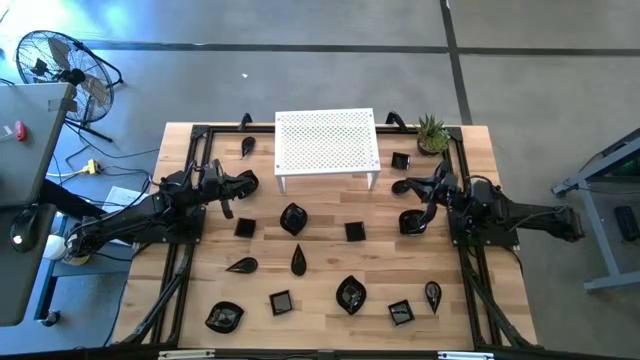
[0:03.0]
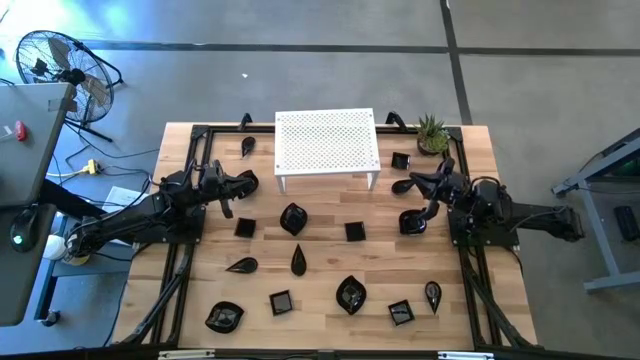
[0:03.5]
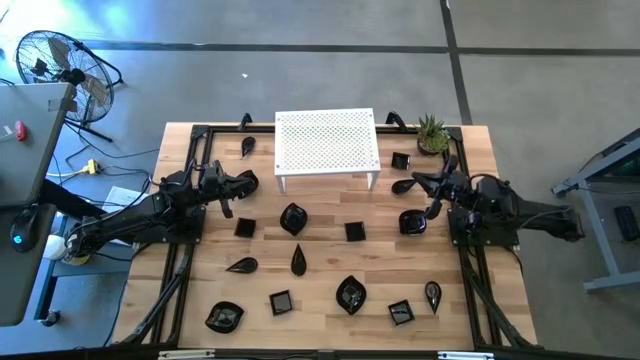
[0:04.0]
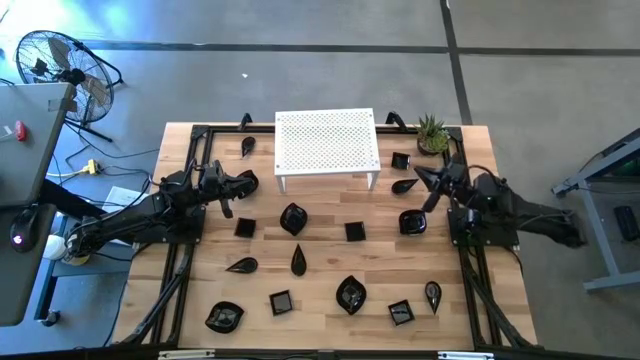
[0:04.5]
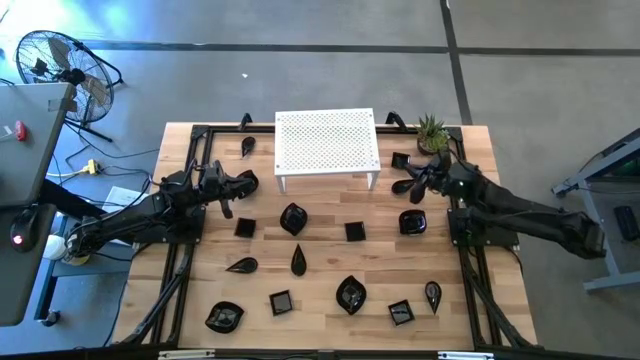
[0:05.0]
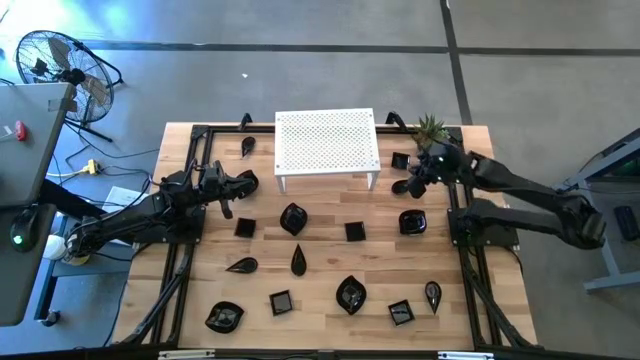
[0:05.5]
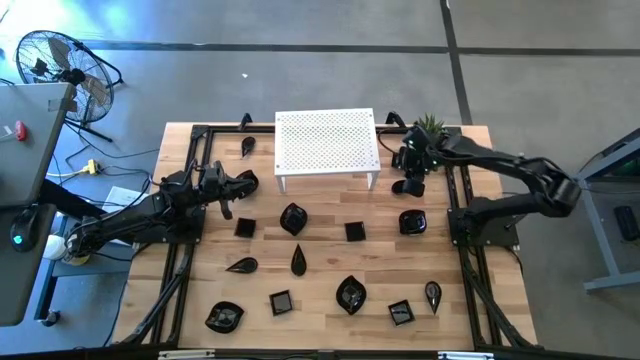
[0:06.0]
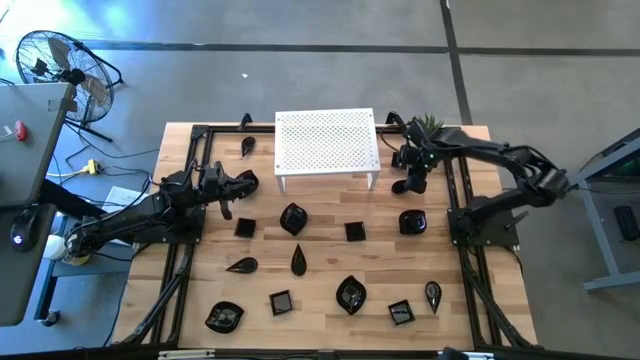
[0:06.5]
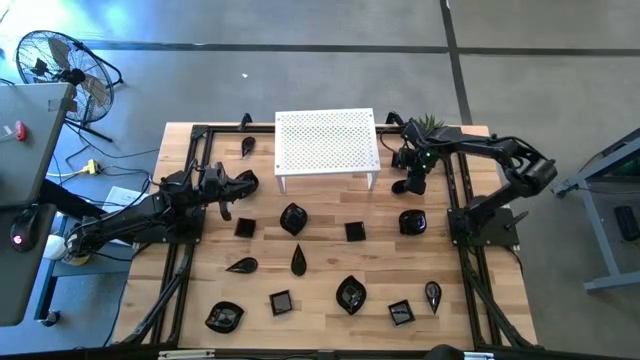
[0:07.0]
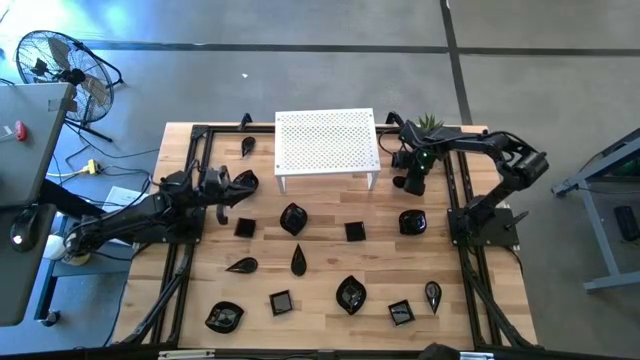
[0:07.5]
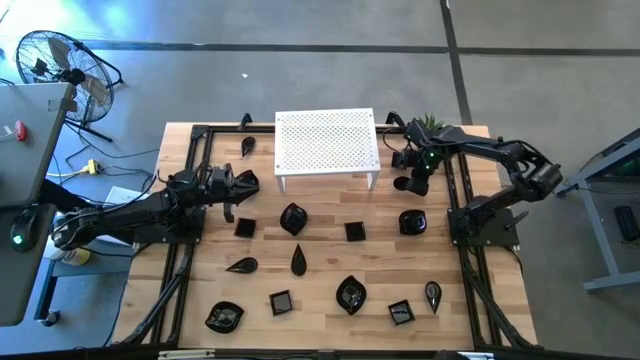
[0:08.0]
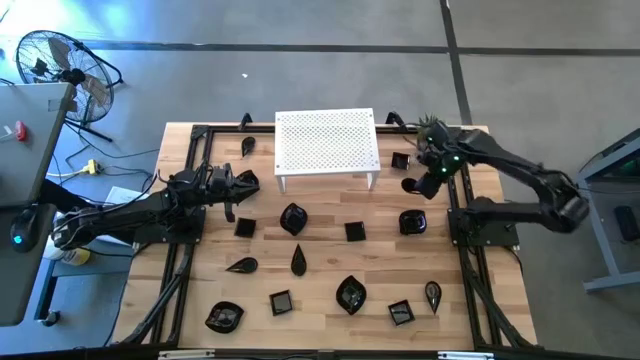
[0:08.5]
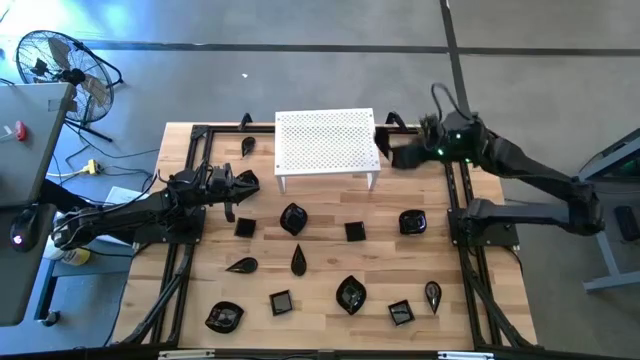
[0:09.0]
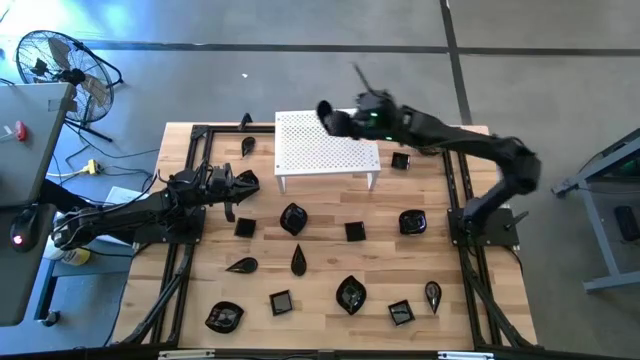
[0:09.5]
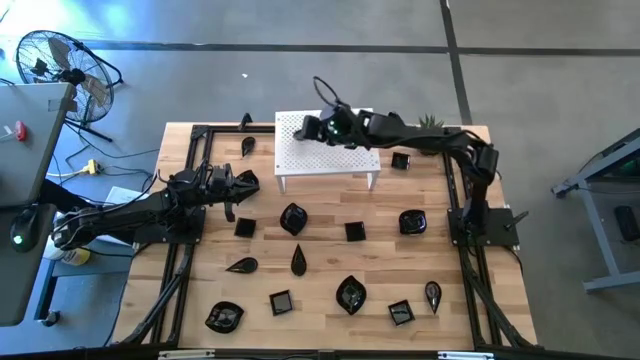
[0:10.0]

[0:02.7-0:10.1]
Task: Pick & Place Mini shaped plates
Put the drop shaped bowl on the shelf

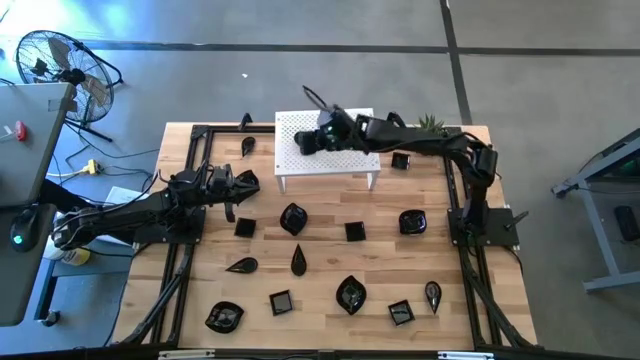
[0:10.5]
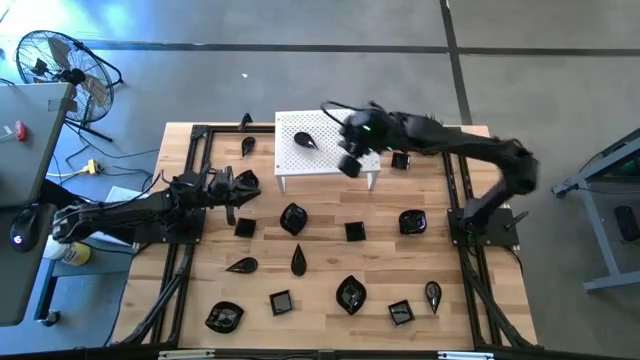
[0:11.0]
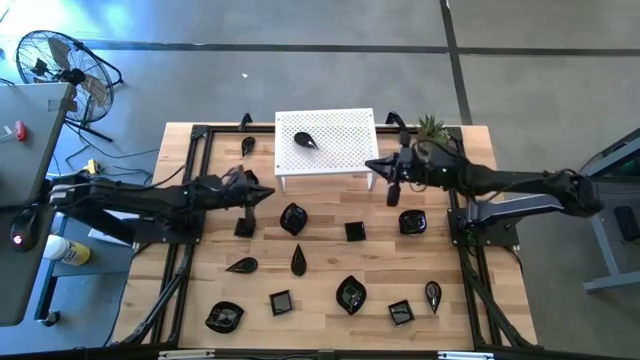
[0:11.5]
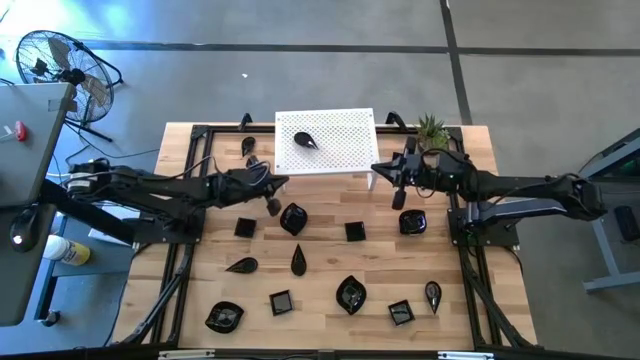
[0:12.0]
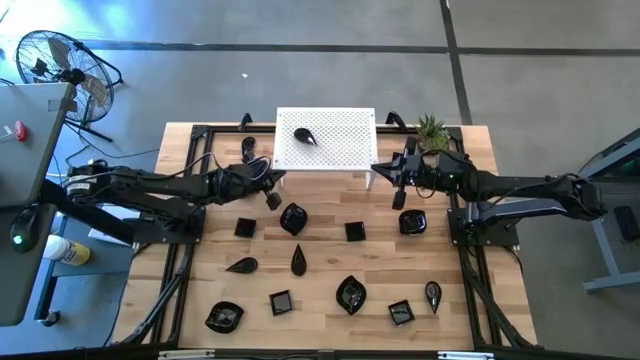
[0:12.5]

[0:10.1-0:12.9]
Adjust the shelf

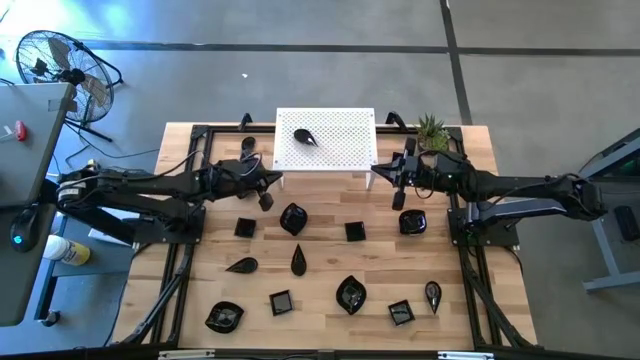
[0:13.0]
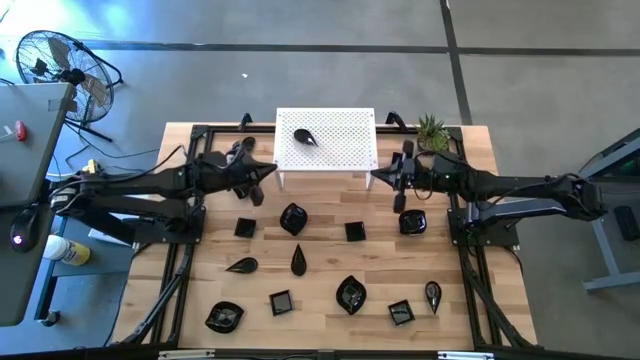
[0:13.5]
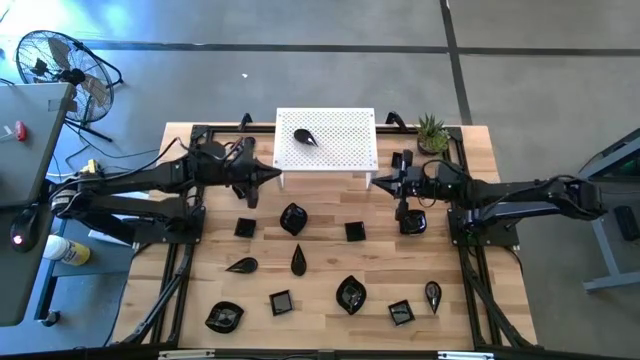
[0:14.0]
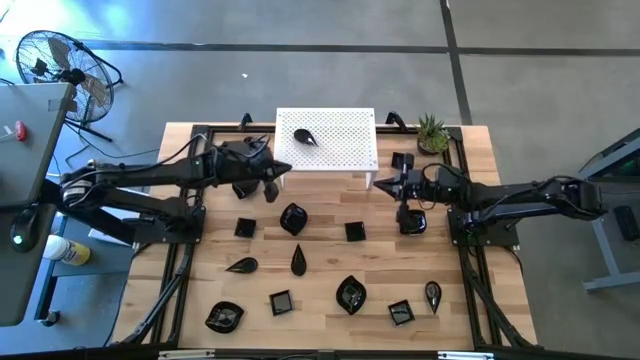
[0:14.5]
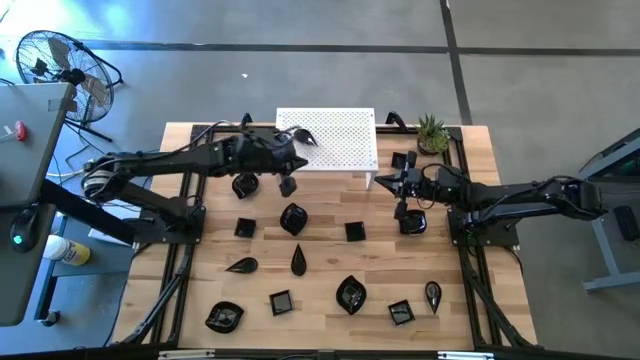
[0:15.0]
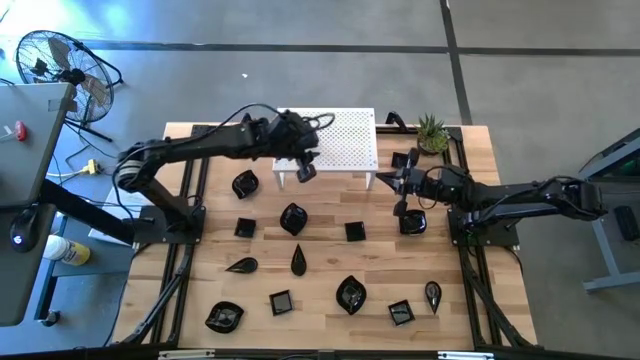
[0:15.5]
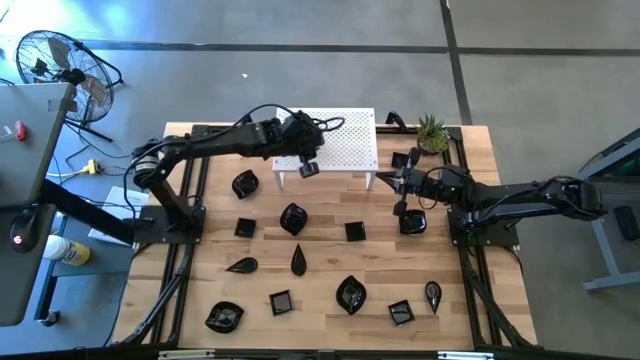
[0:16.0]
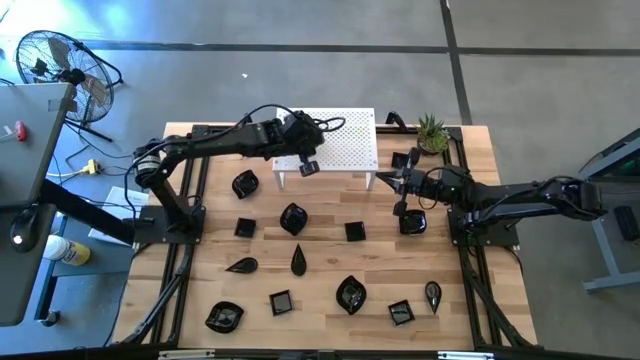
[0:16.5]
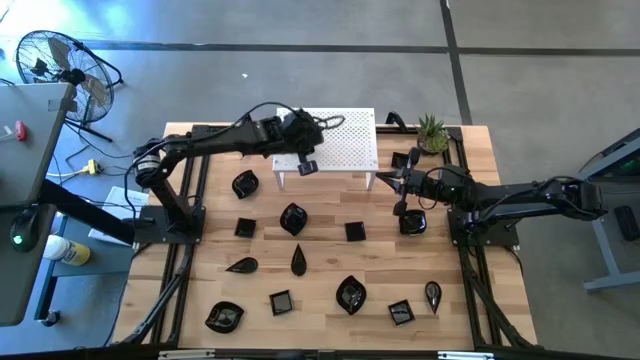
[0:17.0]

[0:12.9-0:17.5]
Adjust the drop shaped bowl on the shelf

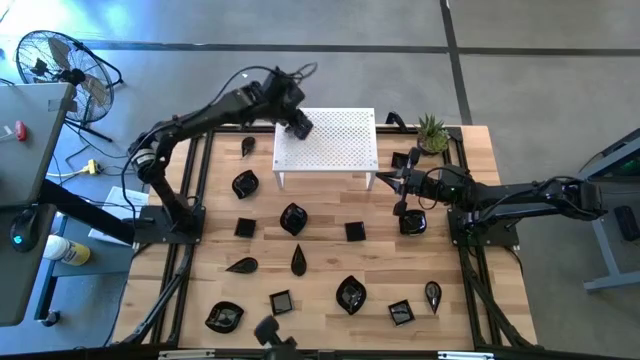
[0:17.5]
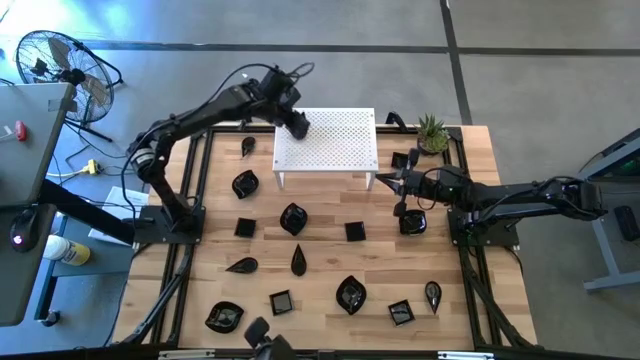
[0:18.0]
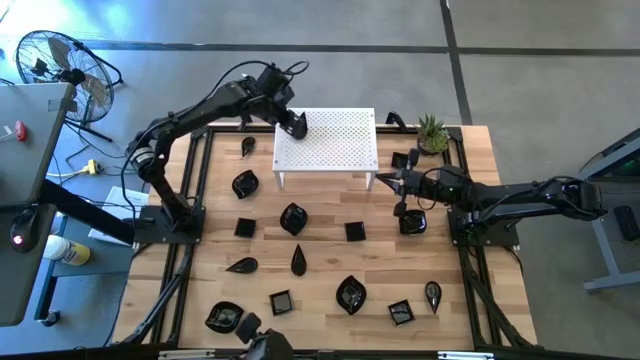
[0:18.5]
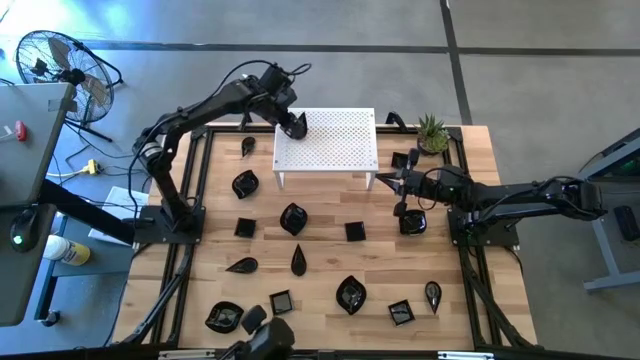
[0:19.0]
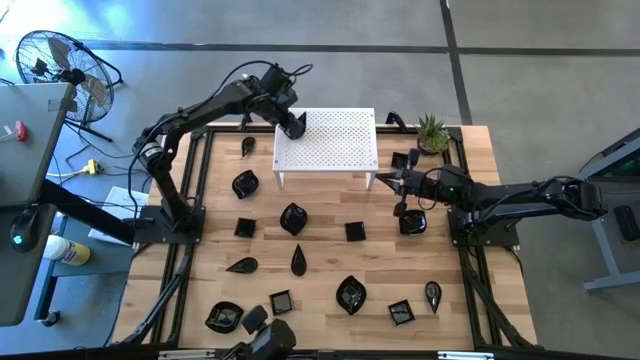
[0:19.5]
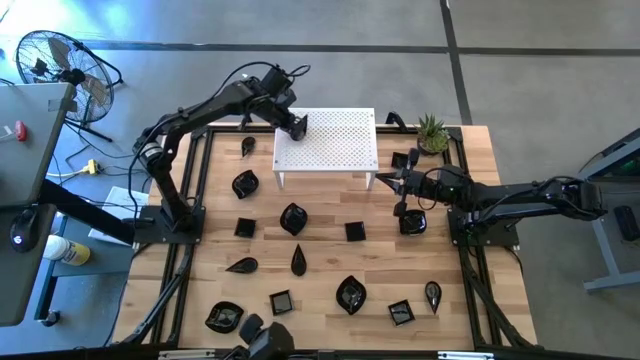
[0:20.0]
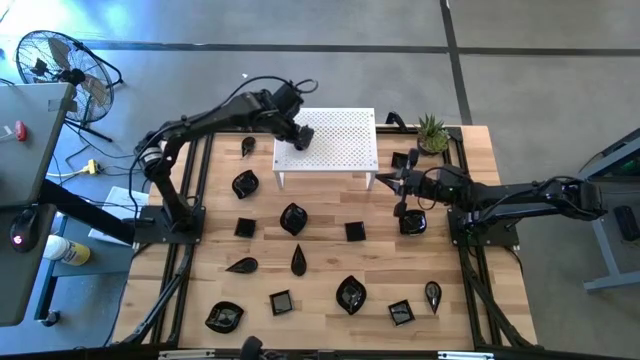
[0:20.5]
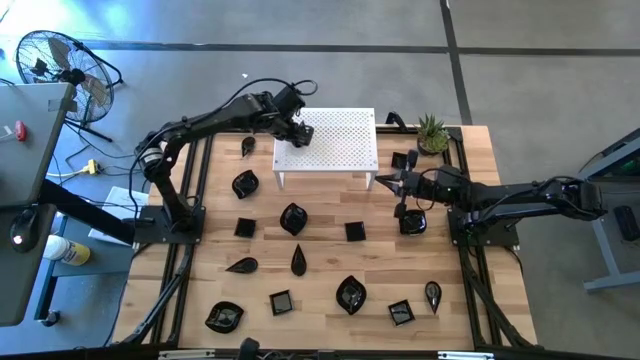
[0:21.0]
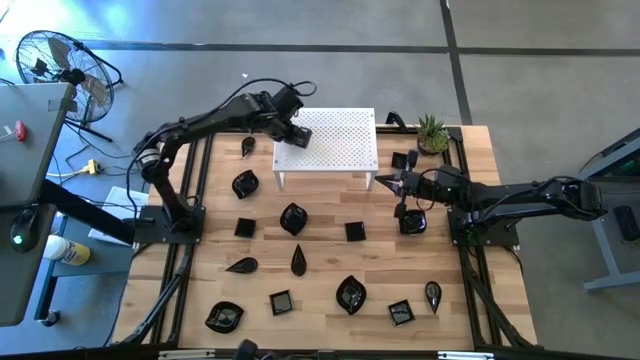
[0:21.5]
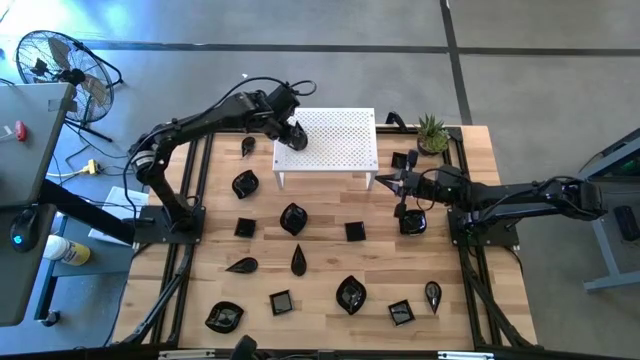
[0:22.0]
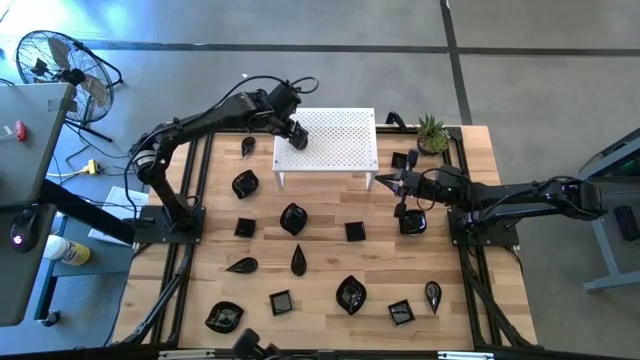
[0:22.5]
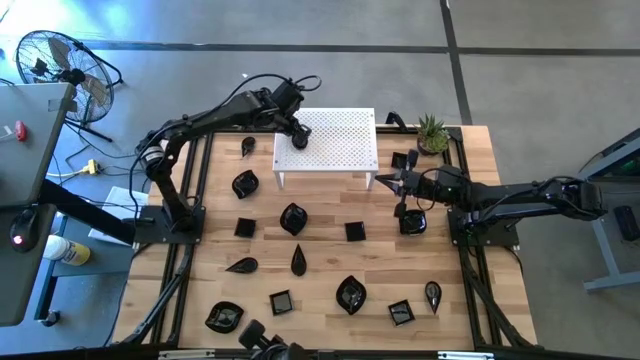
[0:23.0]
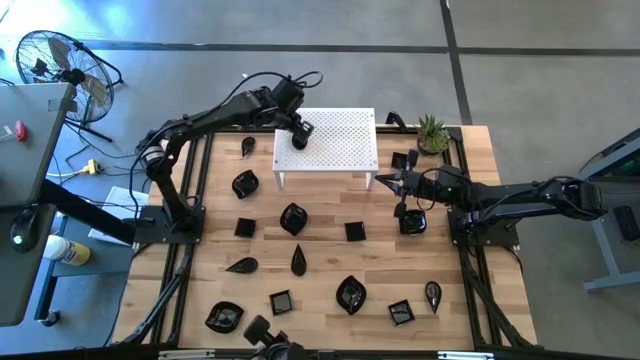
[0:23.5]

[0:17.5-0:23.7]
Adjust the drop shaped bowl on the shelf

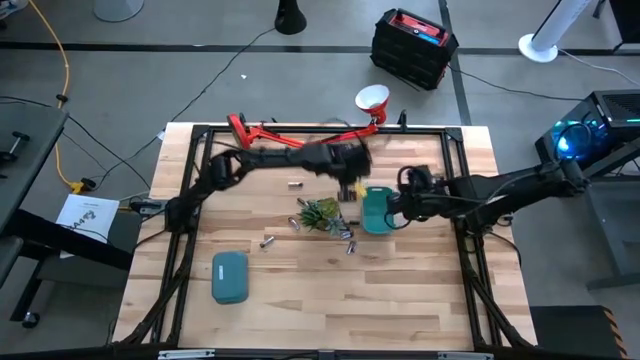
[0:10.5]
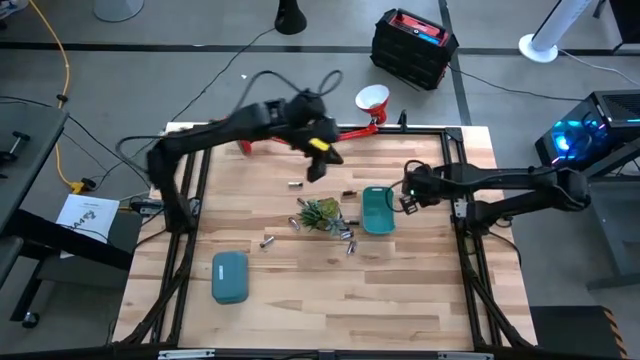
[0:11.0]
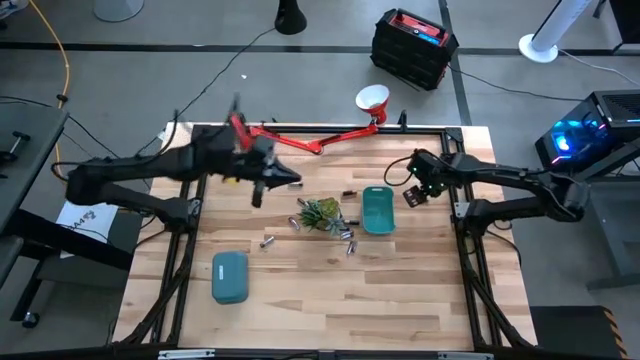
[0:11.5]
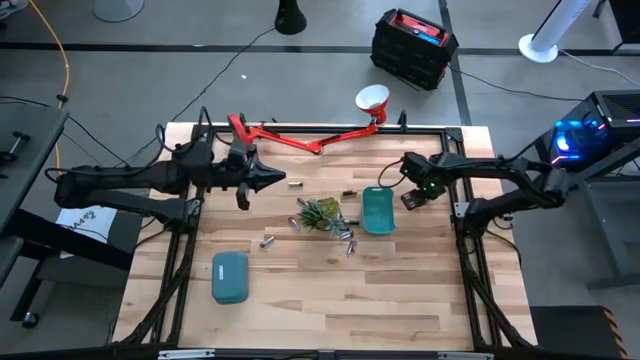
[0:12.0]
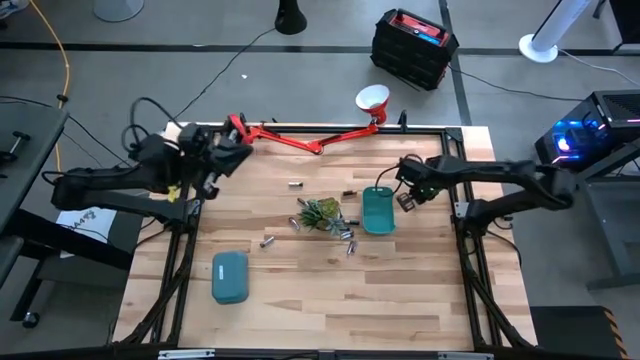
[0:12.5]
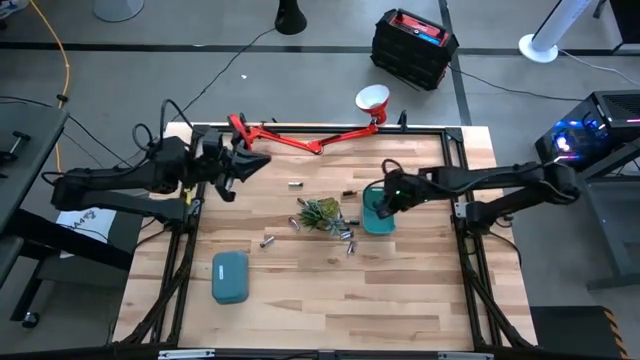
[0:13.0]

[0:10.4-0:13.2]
Task: Sort batteries
Put the black battery into the green bin
